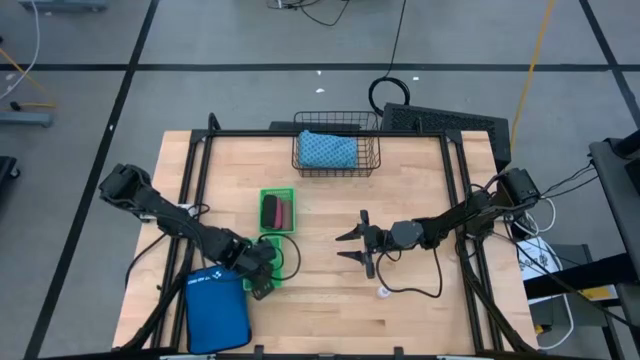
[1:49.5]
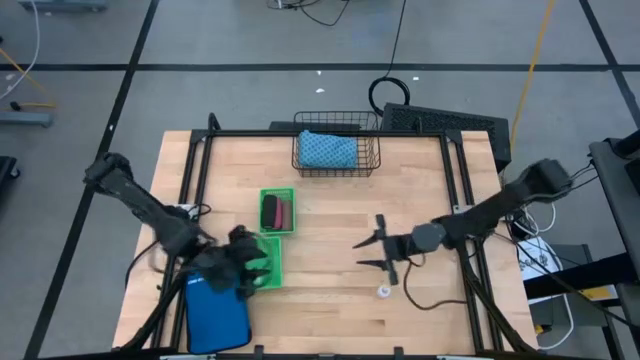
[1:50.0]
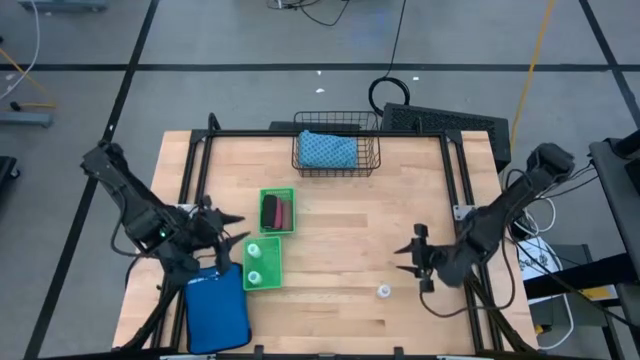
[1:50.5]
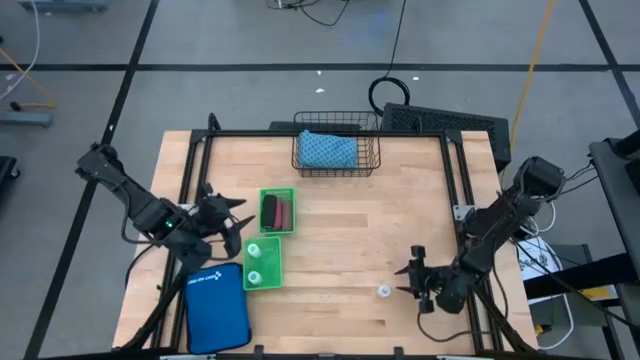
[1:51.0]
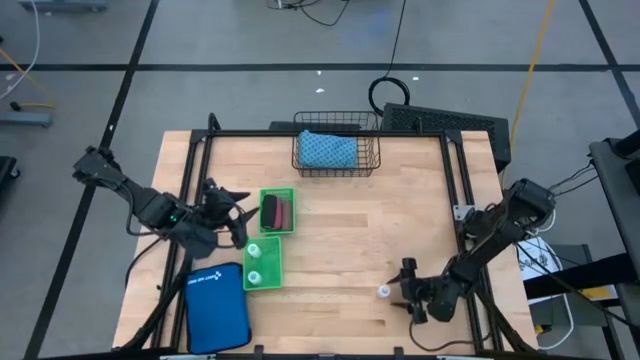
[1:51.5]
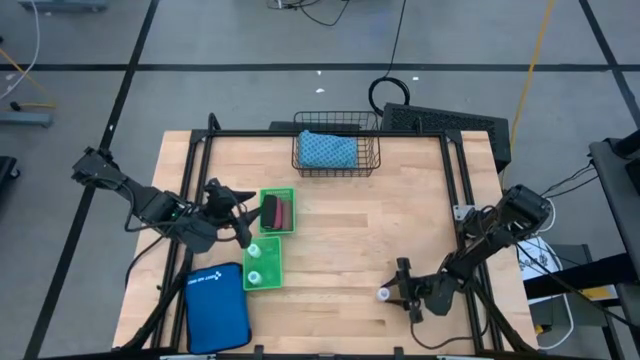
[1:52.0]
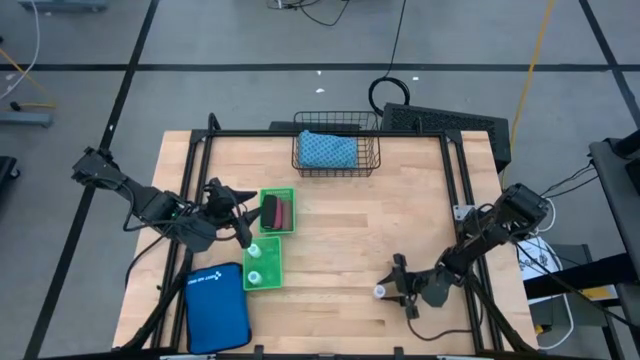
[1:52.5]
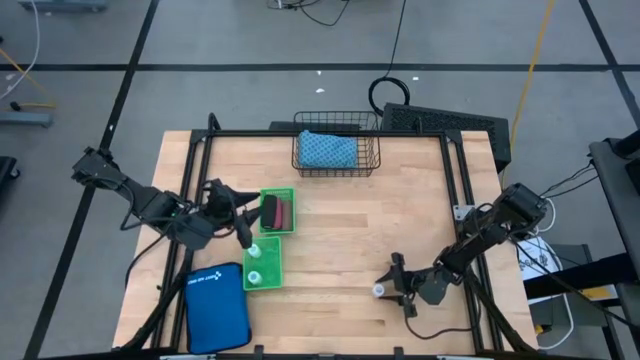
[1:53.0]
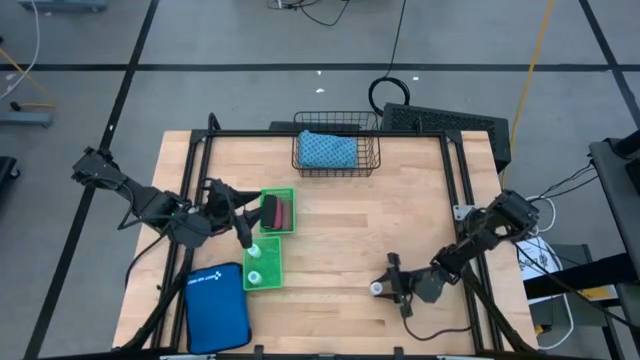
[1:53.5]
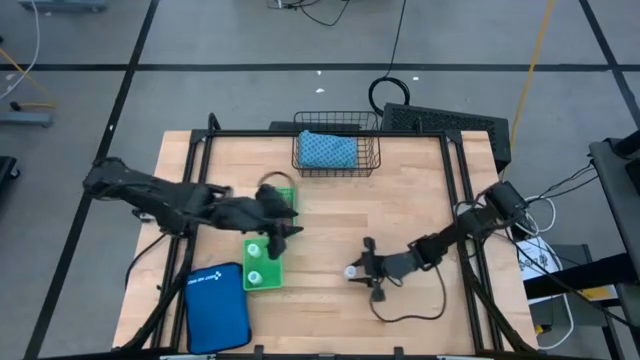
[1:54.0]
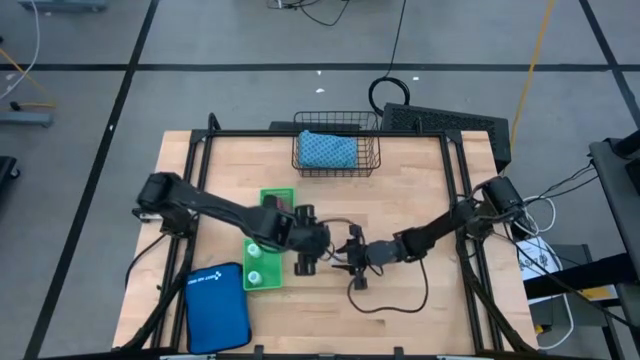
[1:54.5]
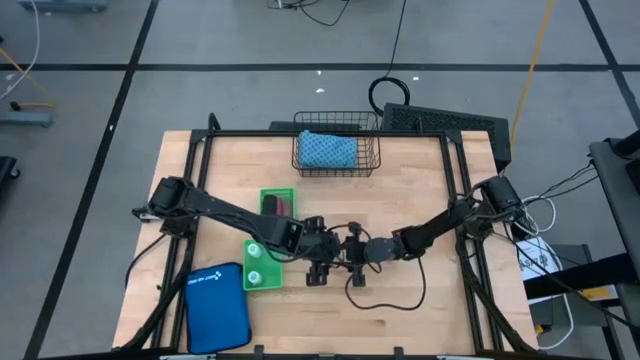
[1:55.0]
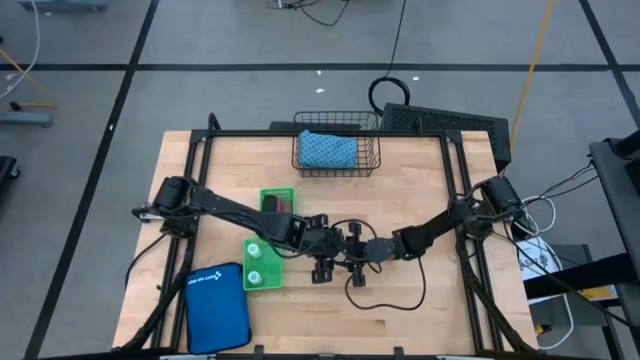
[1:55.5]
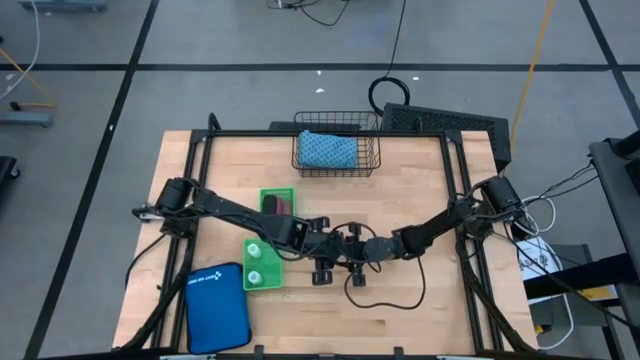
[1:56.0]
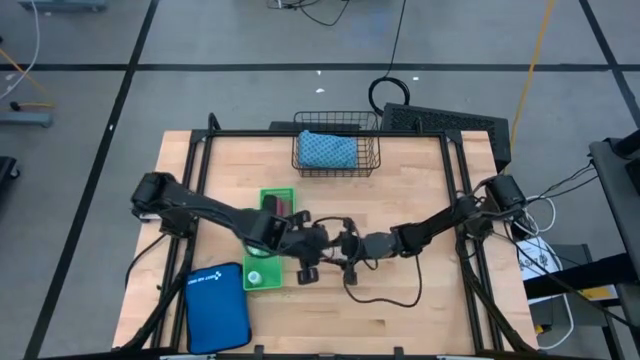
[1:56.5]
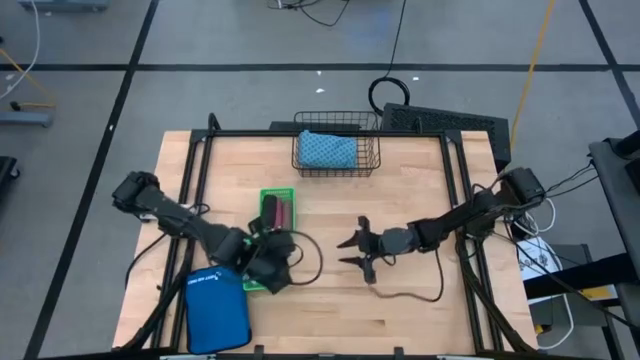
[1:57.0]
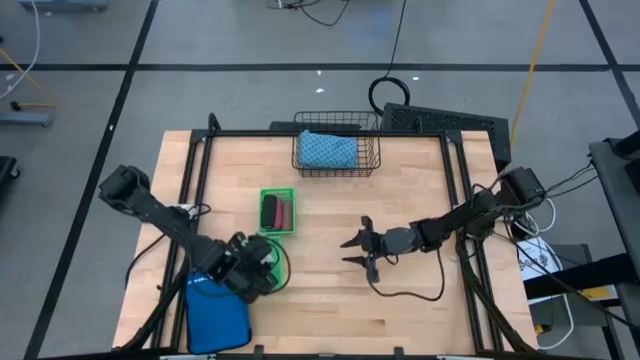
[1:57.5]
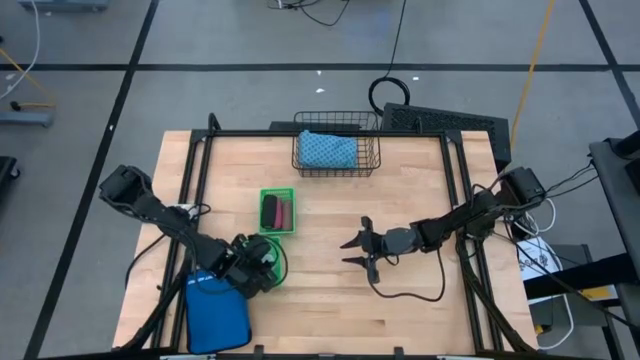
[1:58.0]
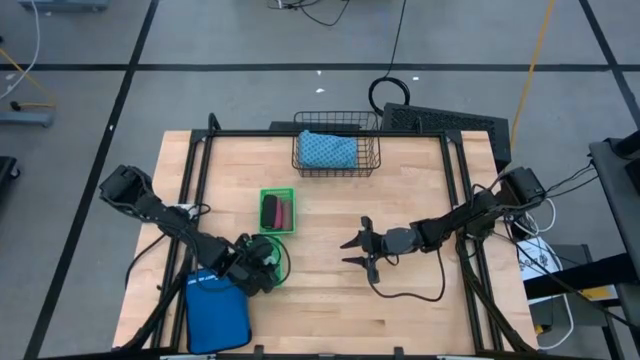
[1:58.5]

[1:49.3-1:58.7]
Task: Pick & Place Medicine items
Put the white pill bottle into the bottom green bin

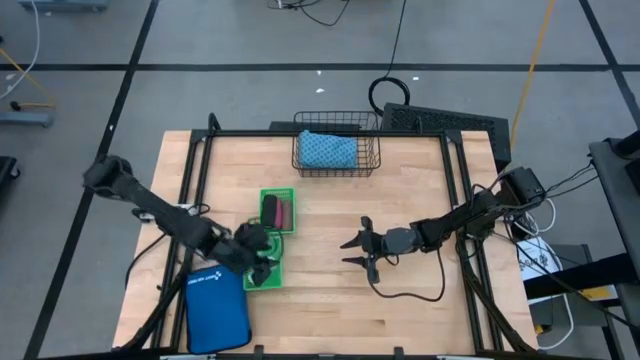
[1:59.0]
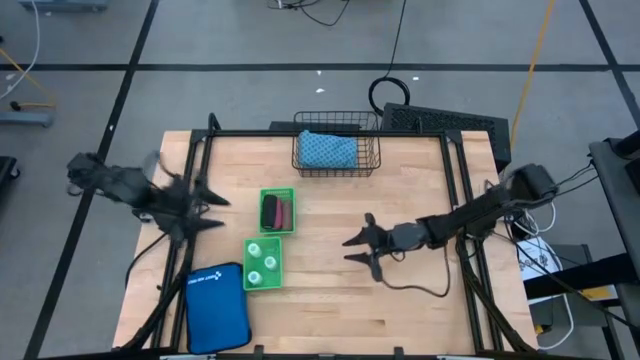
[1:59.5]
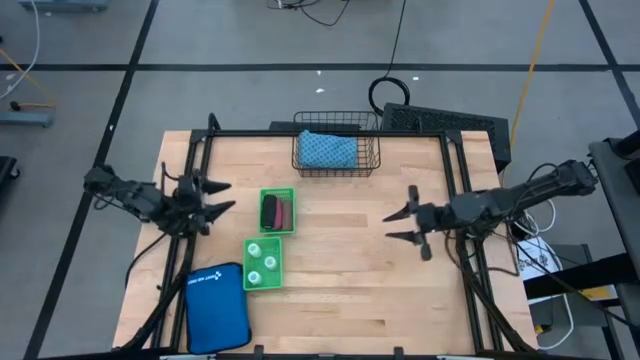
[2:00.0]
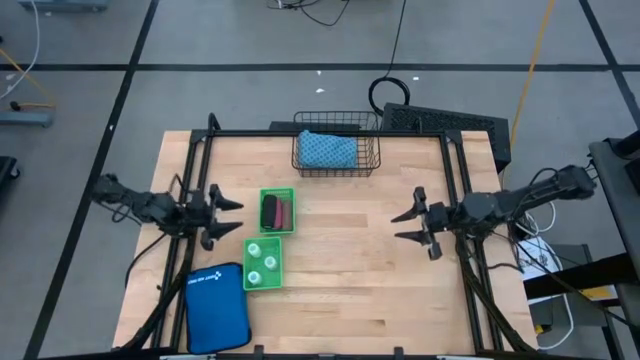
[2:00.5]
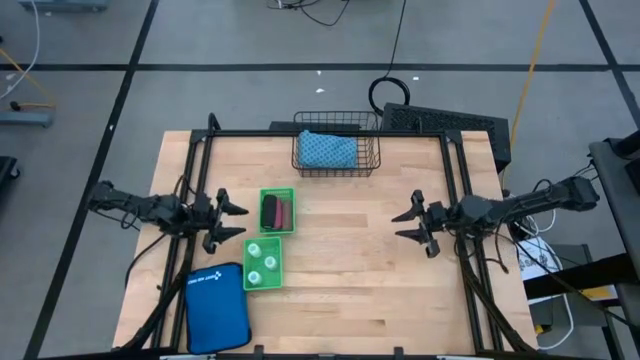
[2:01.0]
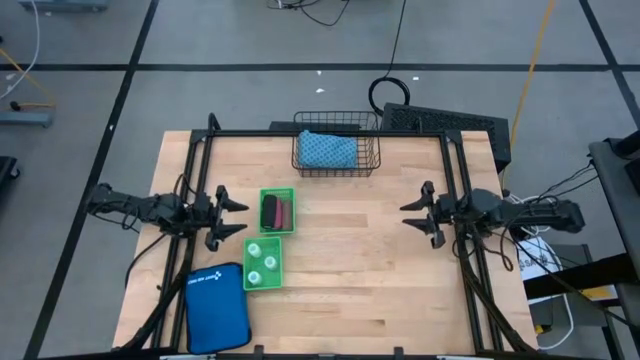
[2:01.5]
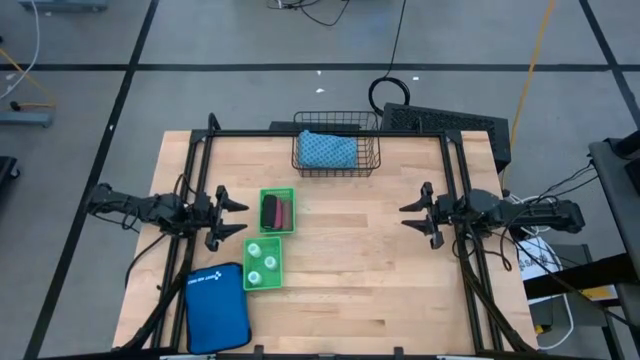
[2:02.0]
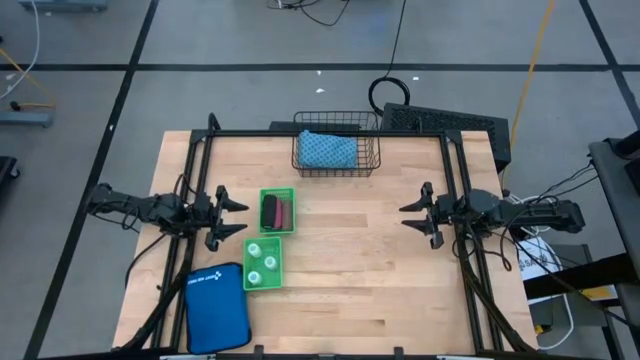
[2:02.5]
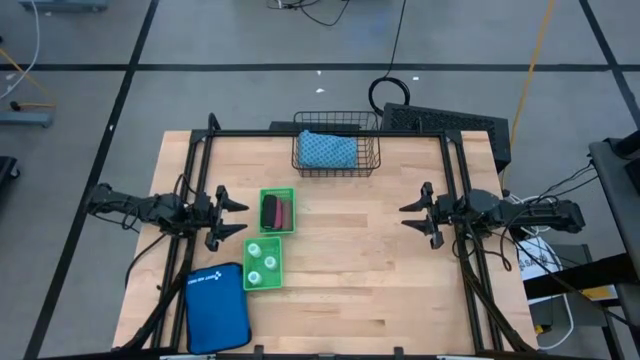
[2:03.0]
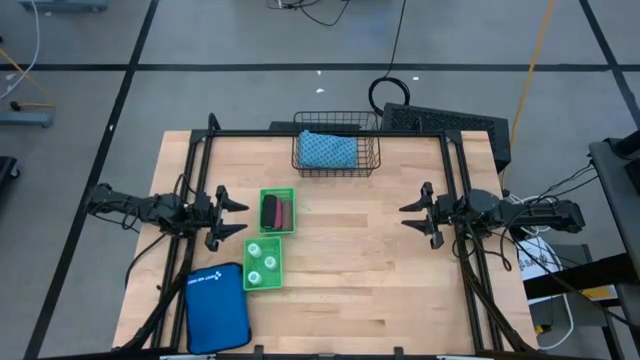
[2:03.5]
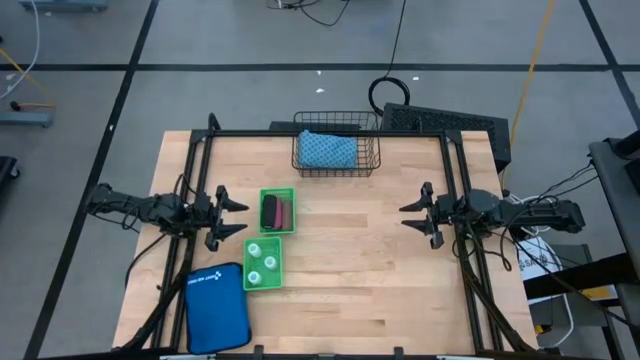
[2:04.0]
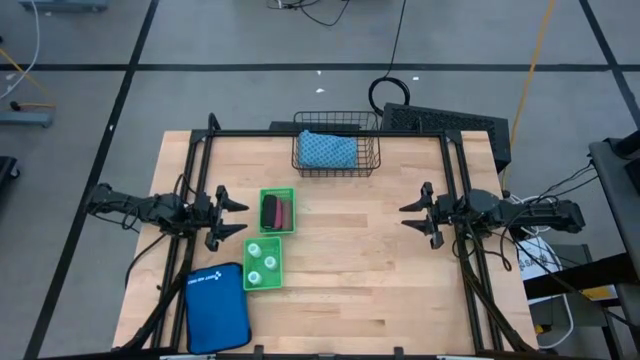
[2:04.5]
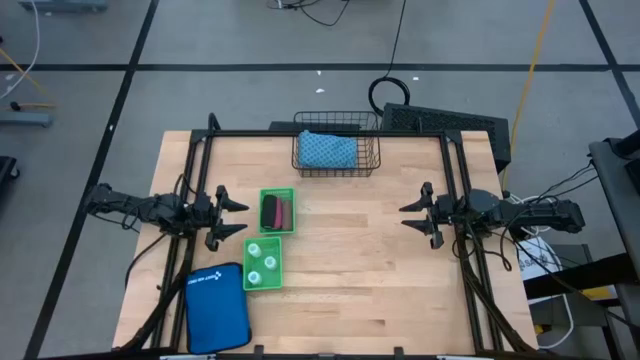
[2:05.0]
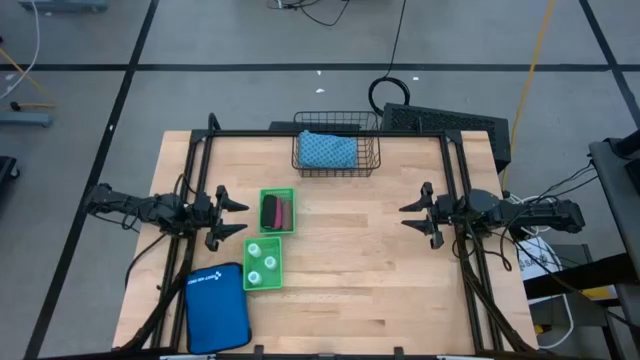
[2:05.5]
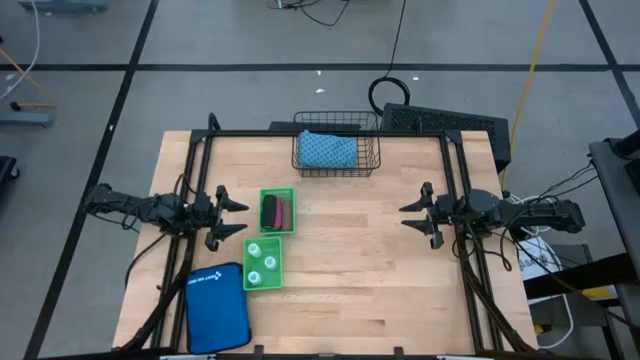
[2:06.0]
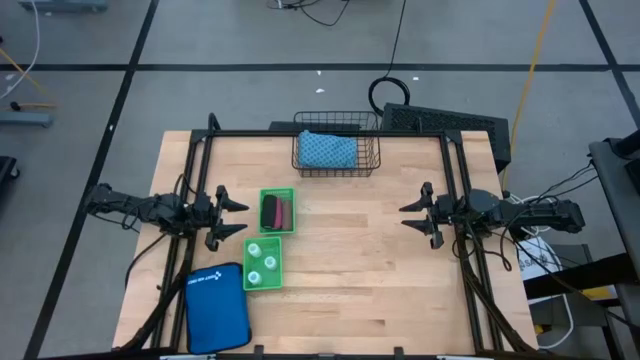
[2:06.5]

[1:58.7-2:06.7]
Return to Home Position

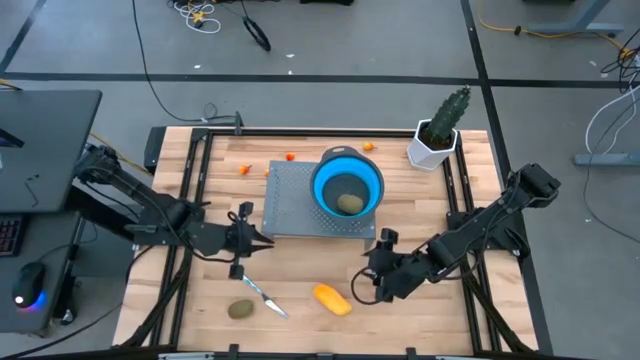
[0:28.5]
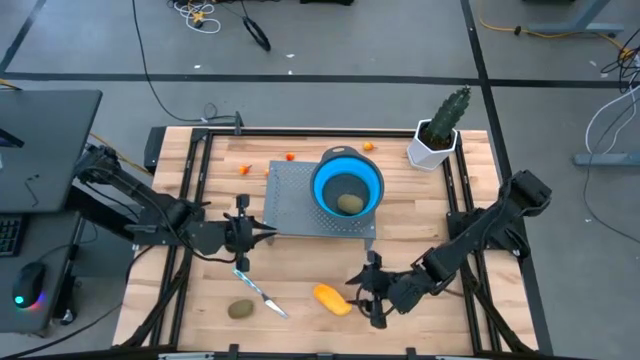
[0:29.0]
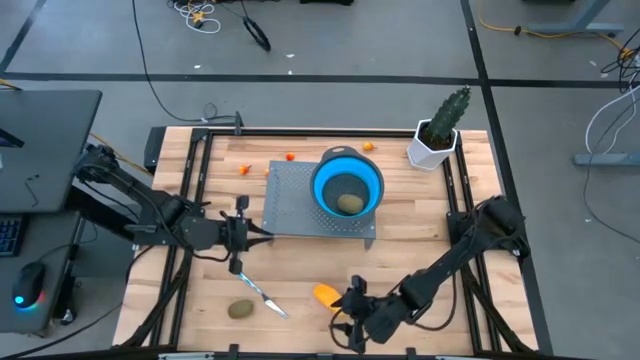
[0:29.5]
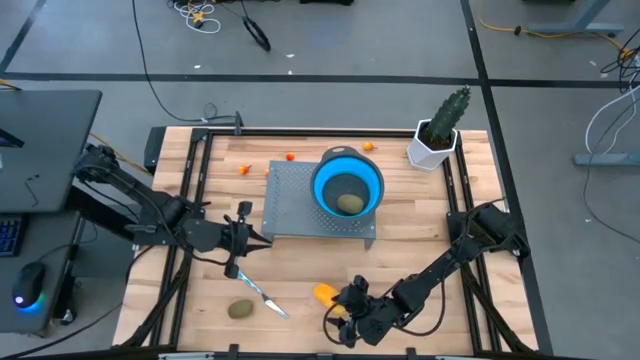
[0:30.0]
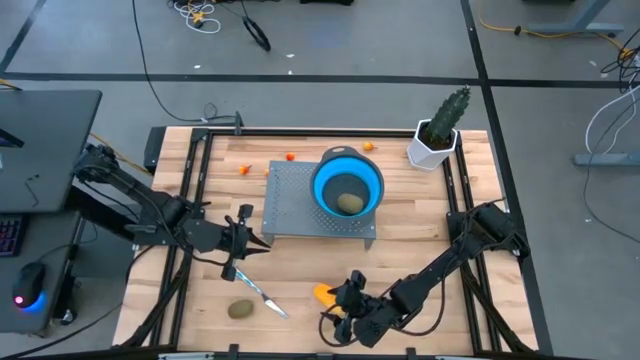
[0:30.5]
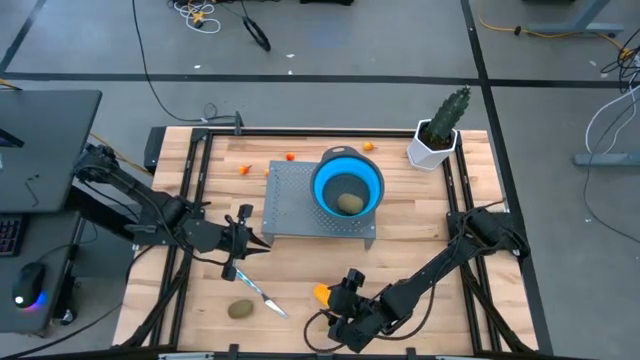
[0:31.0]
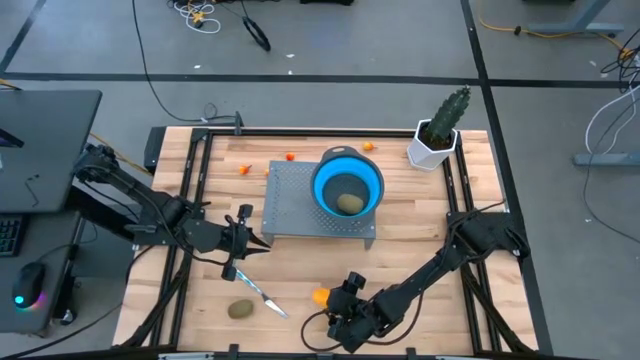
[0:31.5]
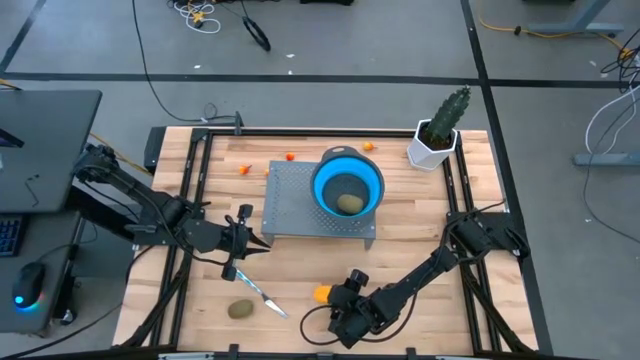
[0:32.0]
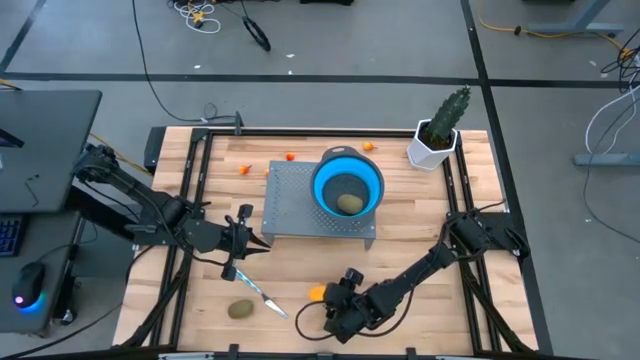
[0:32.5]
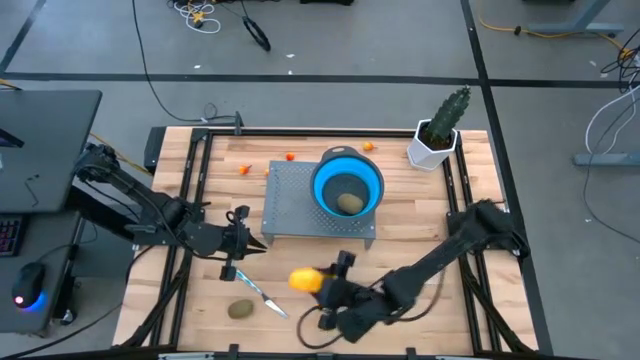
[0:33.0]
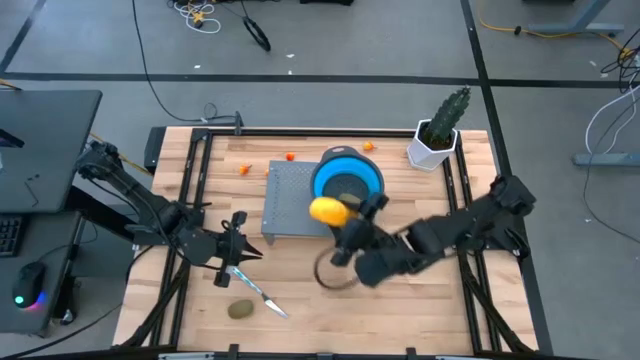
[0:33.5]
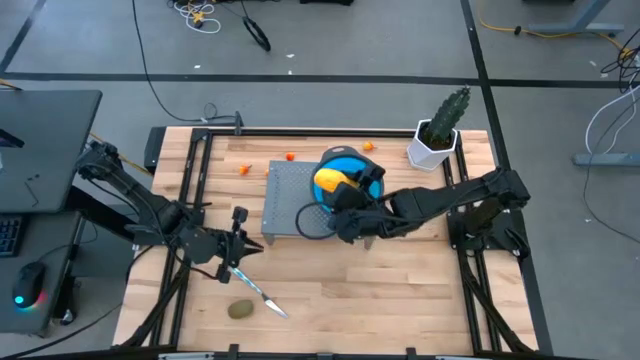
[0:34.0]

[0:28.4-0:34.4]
Task: Pick & Place Fruit
Put the yellow mango into the blue strainer bowl on the shelf
